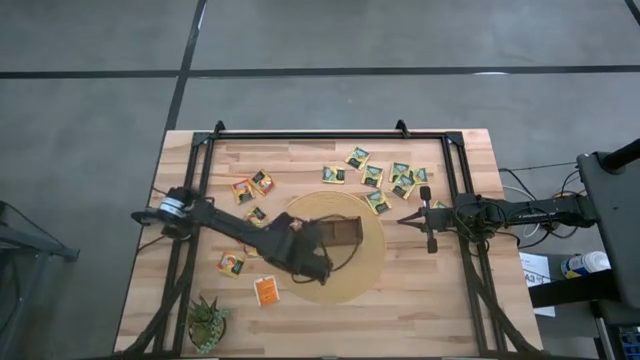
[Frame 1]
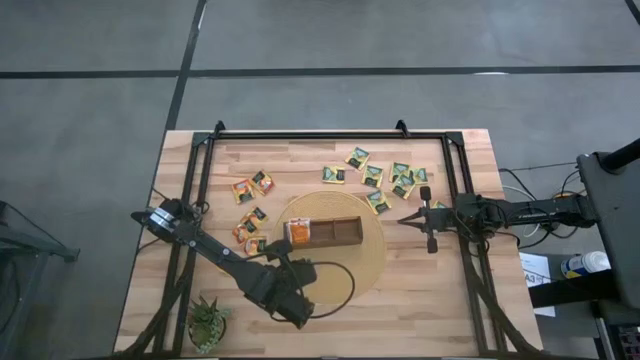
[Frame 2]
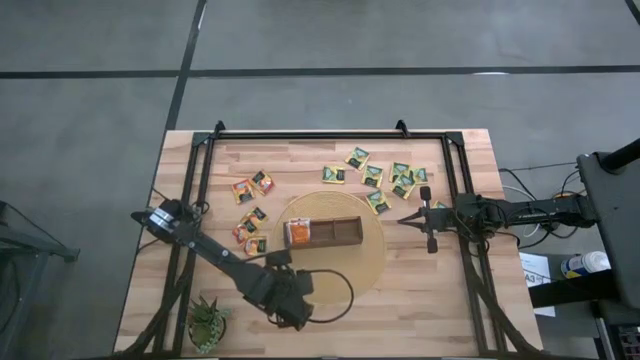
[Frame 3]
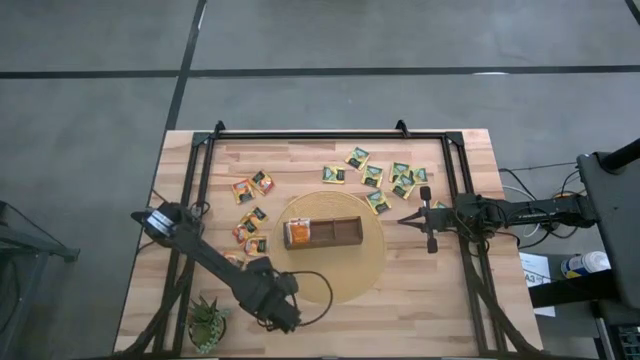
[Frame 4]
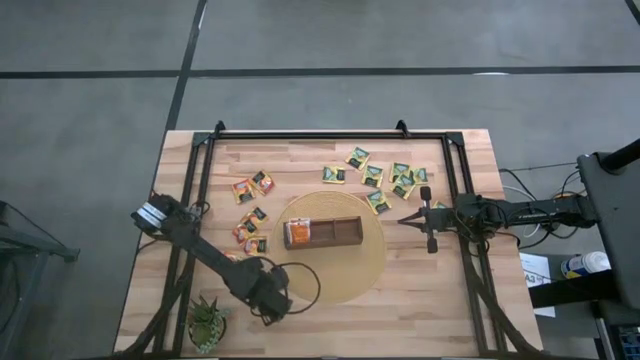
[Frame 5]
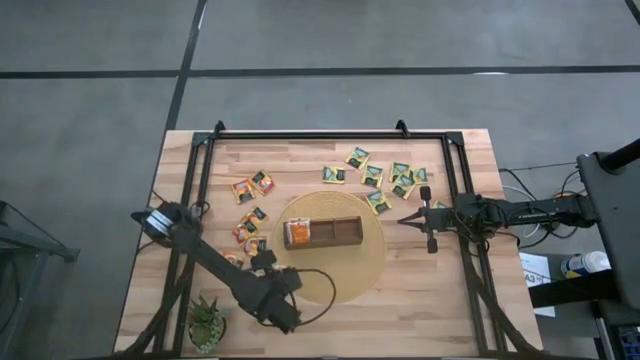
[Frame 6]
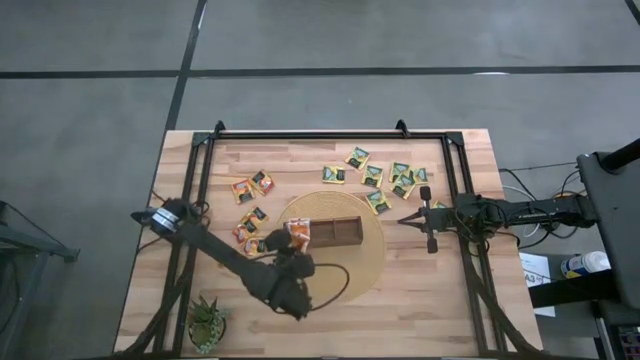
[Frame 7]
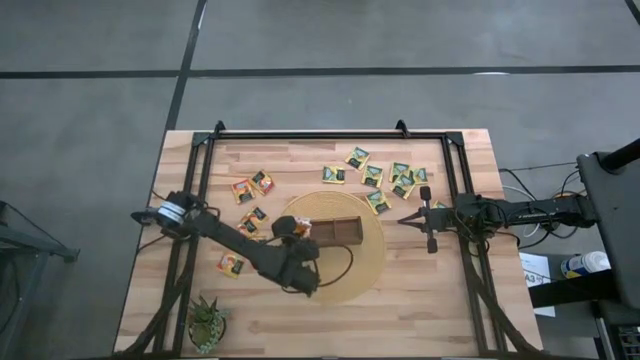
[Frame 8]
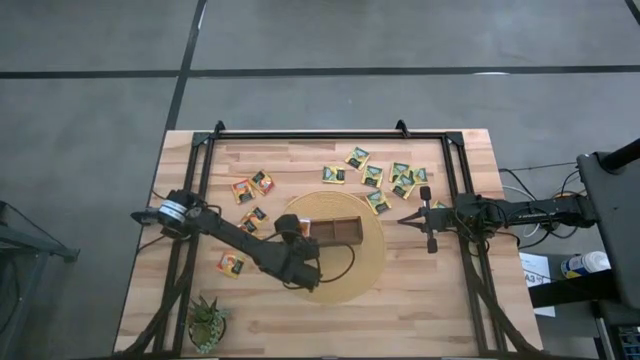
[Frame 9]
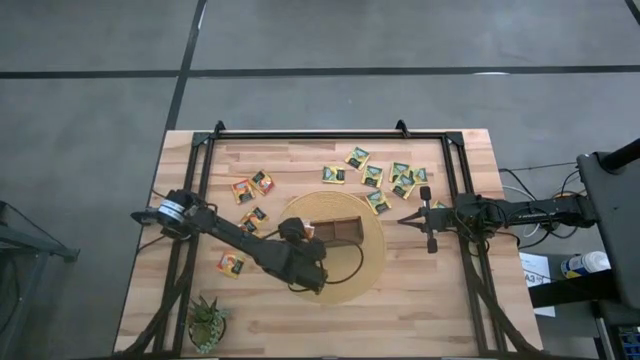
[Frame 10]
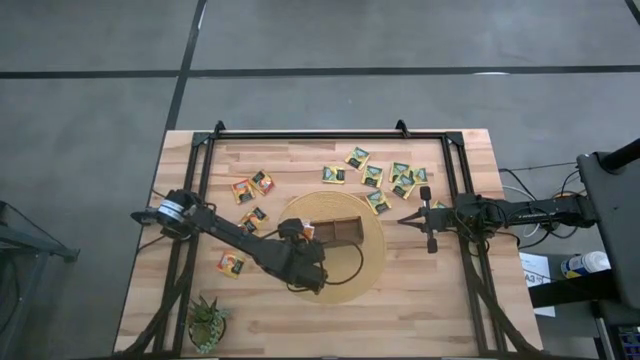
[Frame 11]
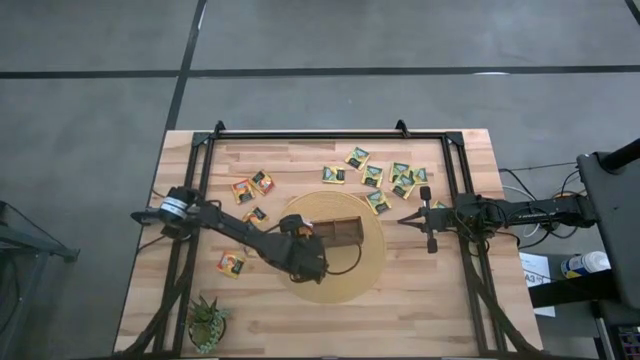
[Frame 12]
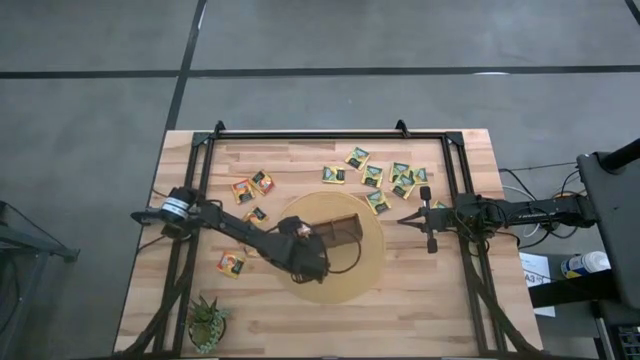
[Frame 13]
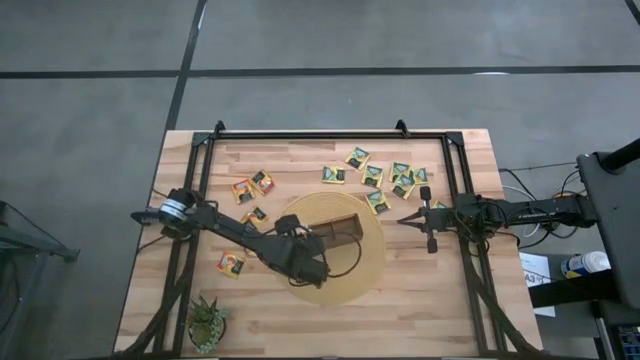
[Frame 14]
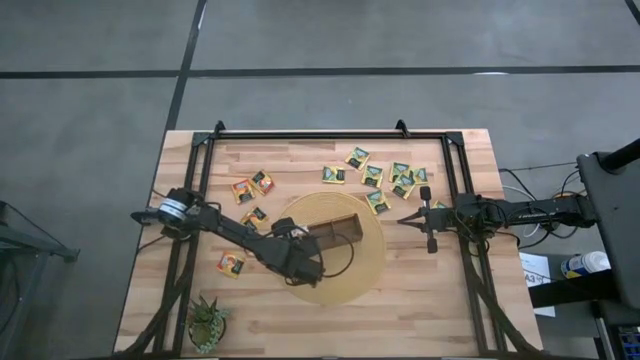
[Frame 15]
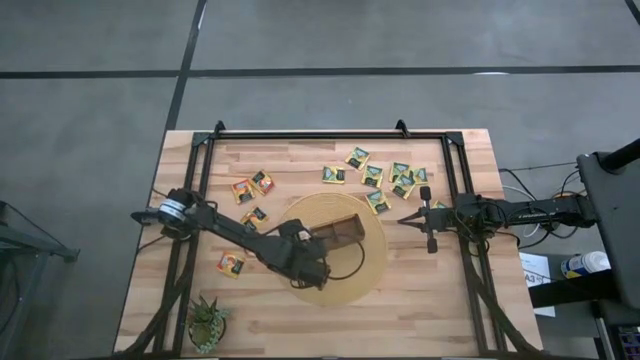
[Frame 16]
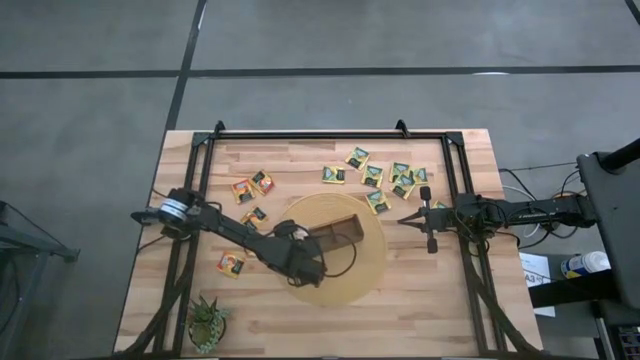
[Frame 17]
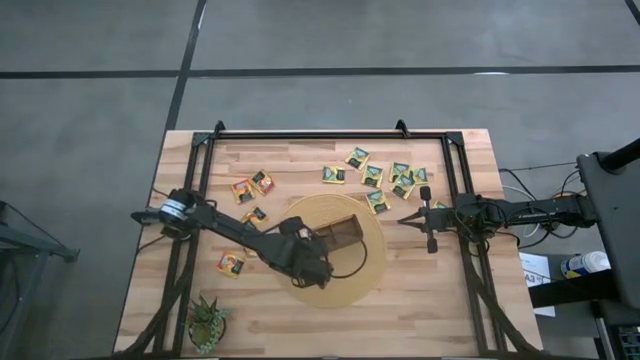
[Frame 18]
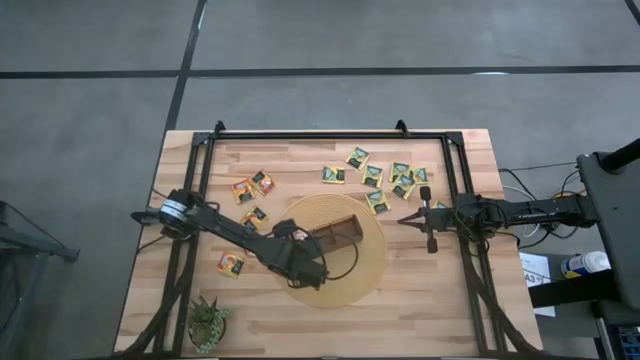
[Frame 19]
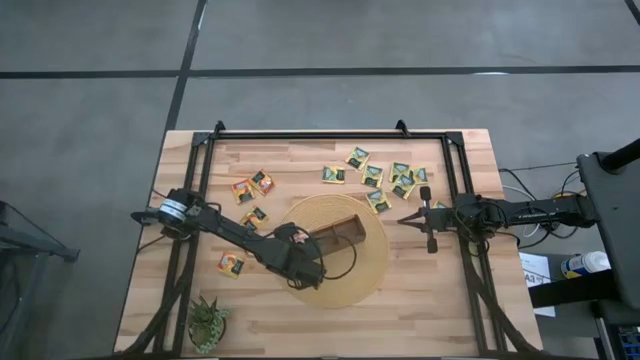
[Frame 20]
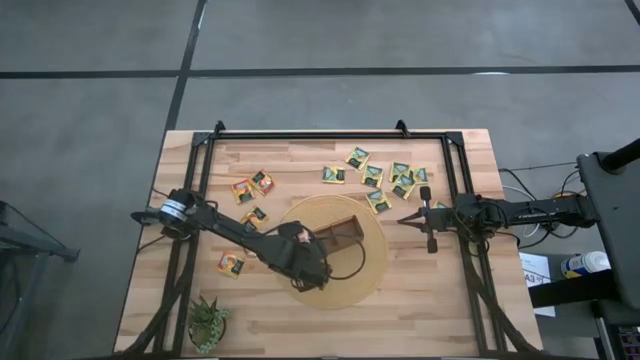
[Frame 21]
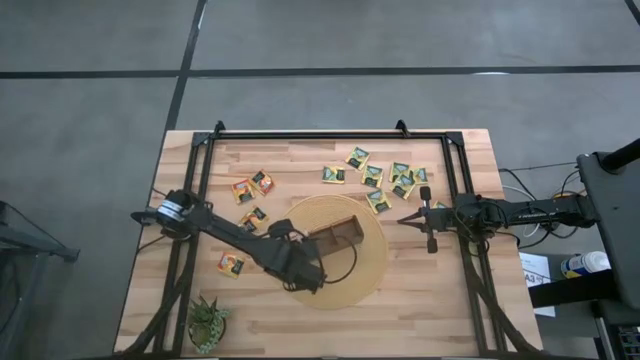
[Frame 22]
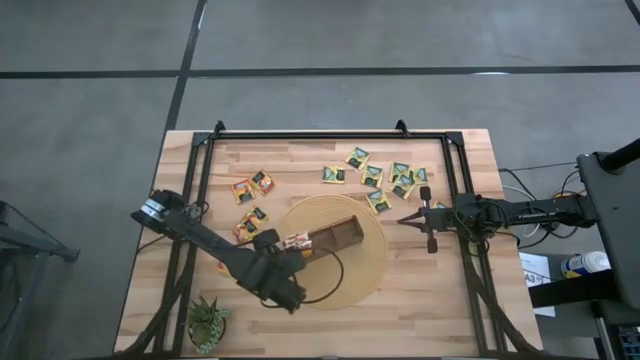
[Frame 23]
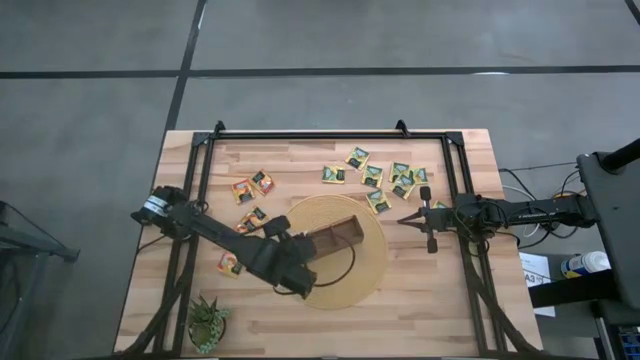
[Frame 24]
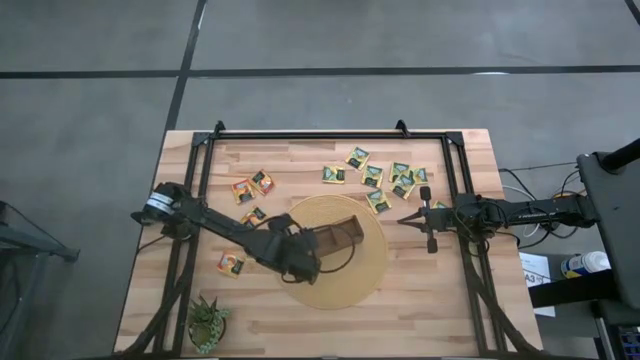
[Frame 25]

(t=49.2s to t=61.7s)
Task: Pick & Place Tea
Put the white orange tea bag into the left section of the wooden organizer

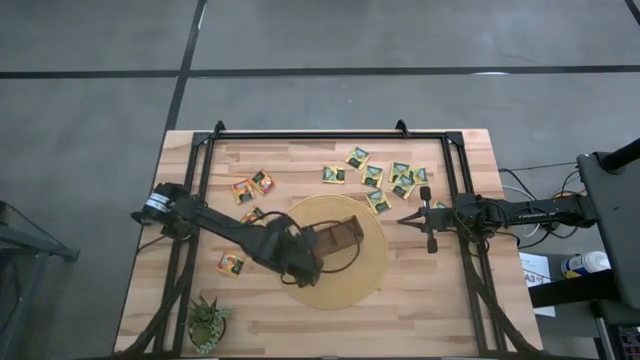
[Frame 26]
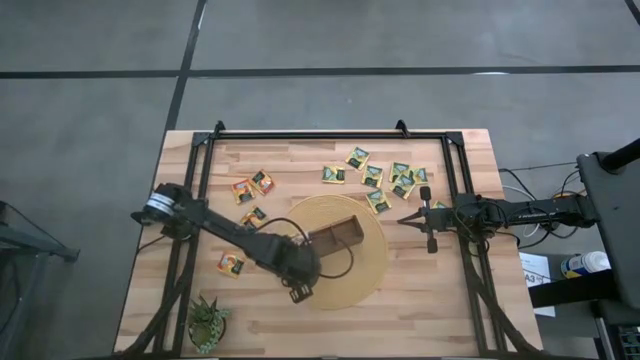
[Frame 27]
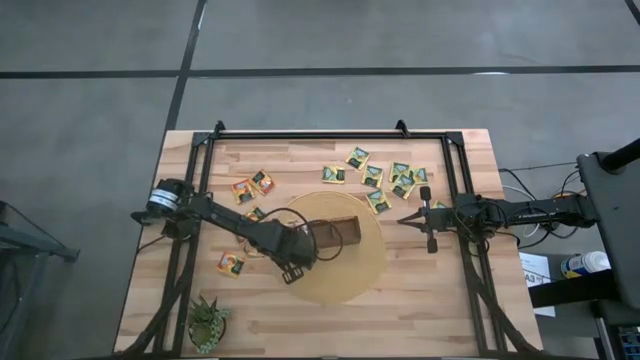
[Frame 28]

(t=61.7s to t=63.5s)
Adjust the wooden organizer

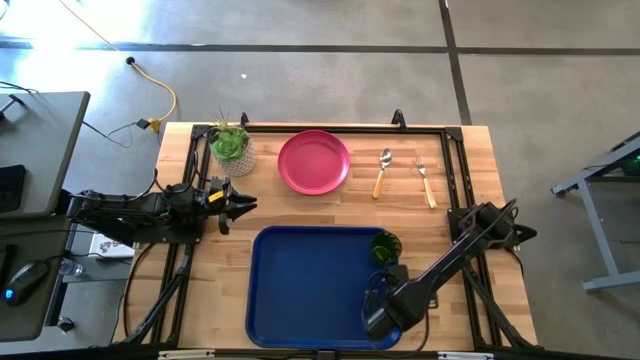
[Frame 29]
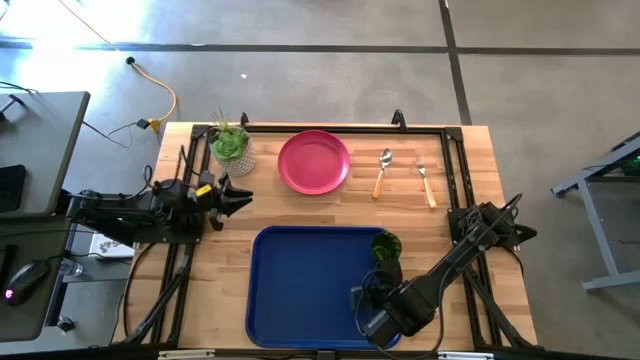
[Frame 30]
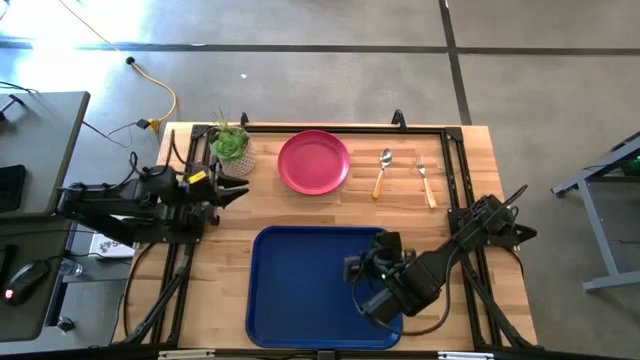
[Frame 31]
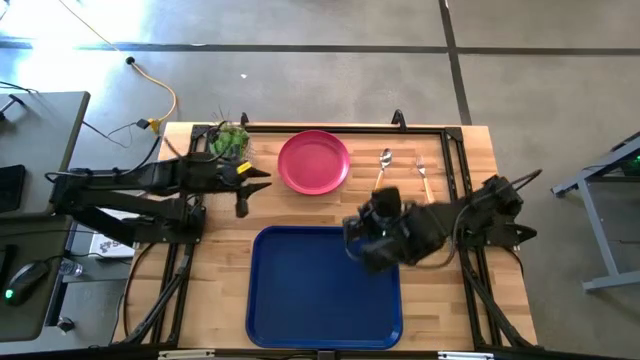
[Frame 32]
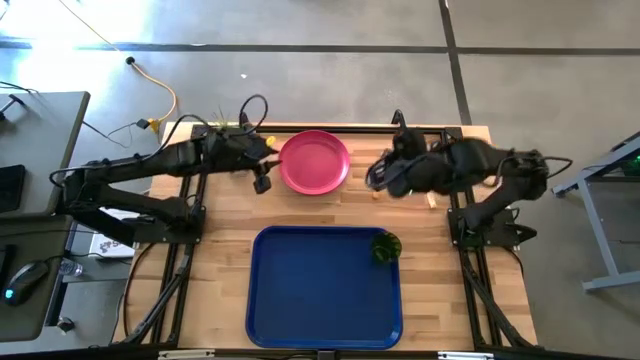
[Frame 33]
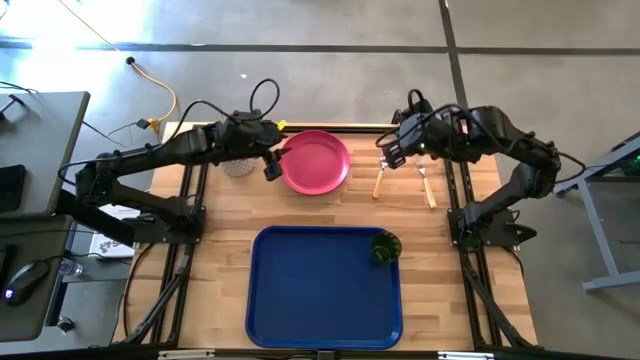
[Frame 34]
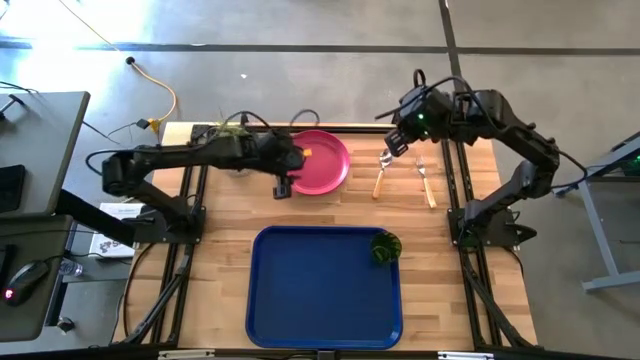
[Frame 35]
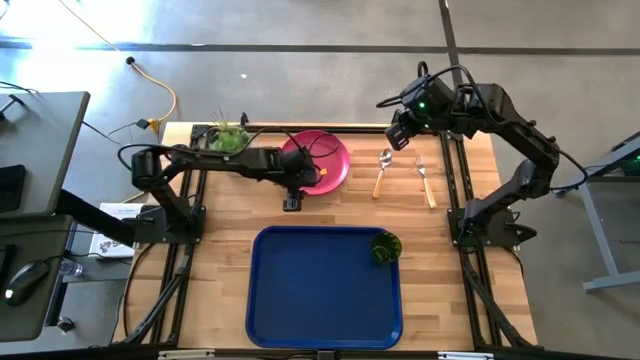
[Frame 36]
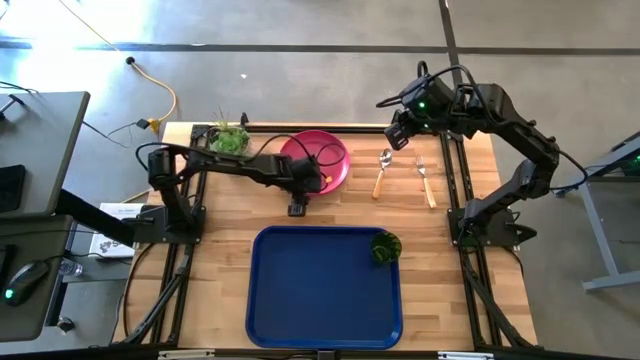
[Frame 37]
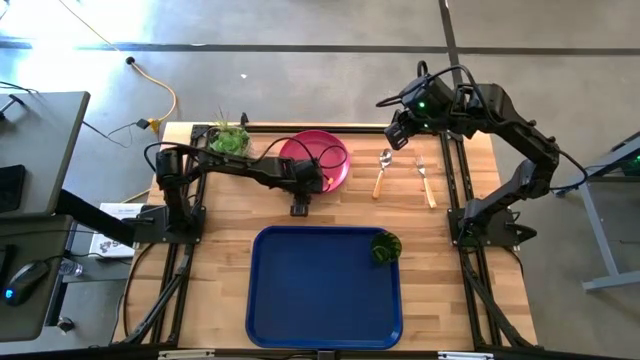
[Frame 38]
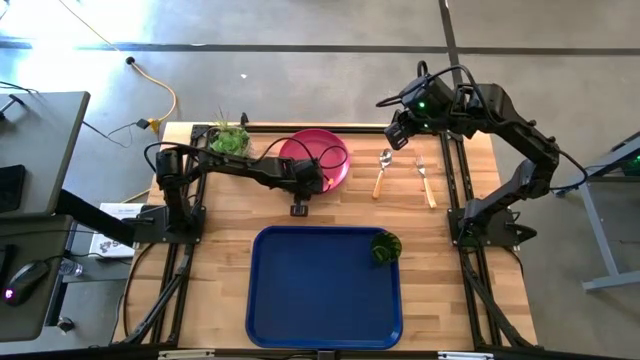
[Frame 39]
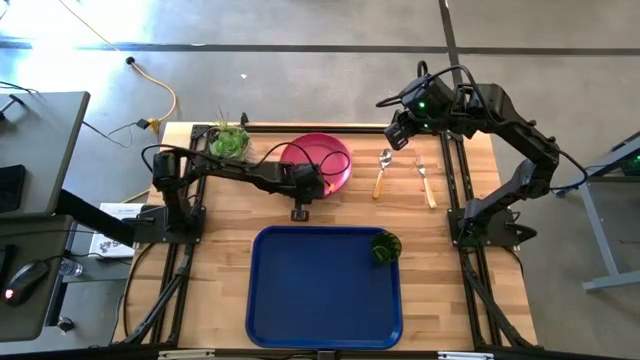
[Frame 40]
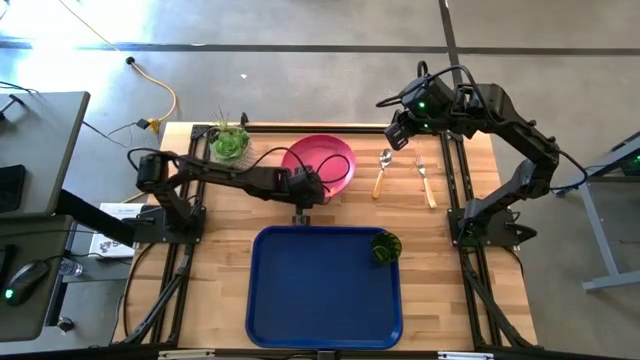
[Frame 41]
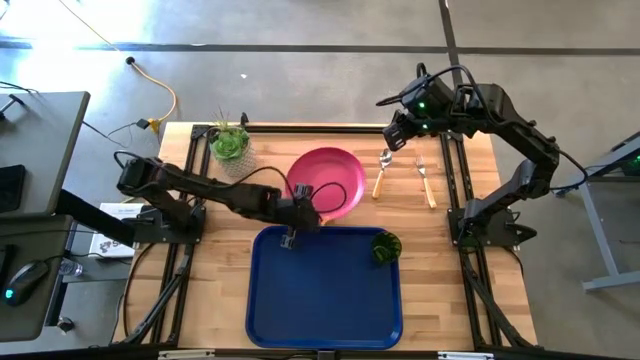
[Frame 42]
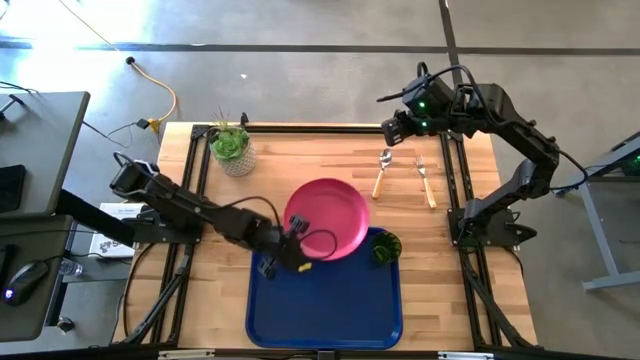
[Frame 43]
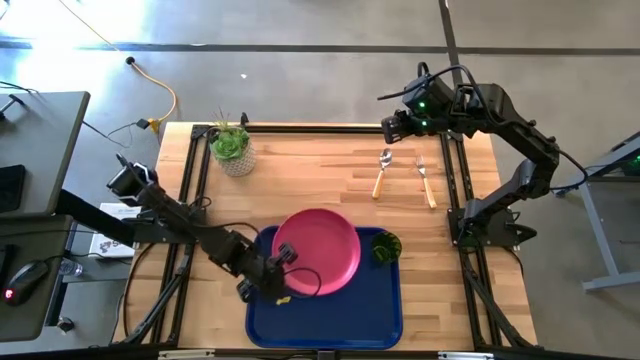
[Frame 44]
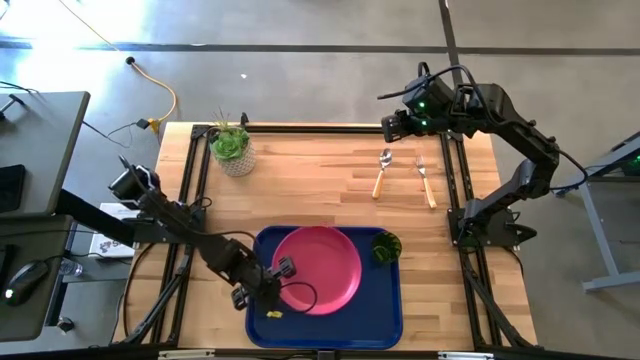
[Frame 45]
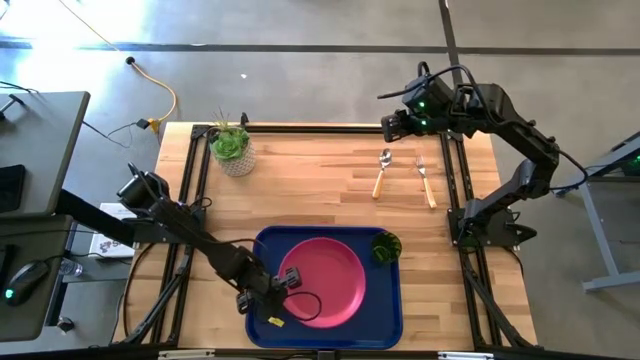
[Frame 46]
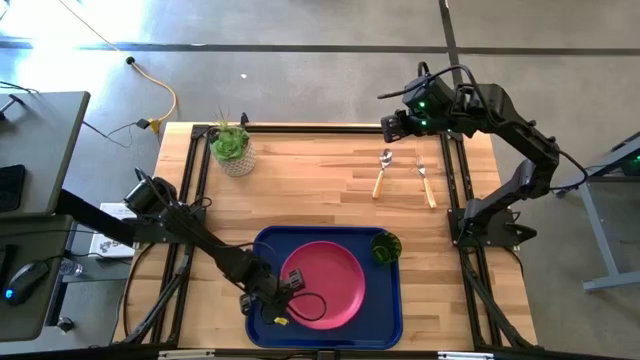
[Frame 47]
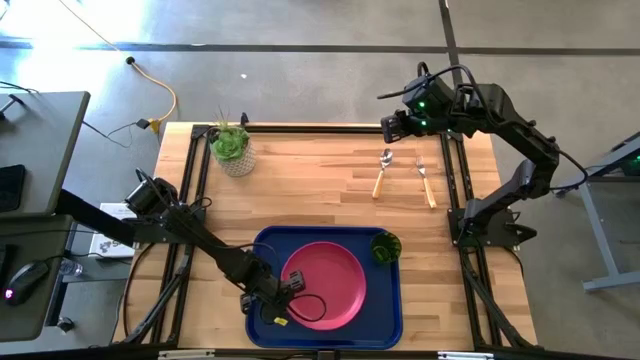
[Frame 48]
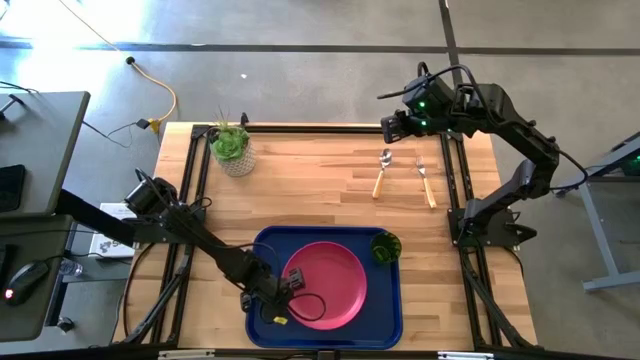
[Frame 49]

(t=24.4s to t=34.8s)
Task: Pick and place plate/cup/fork/spoon on tray
Put the pink plate on the blue tray to the bottom left of the green cup
